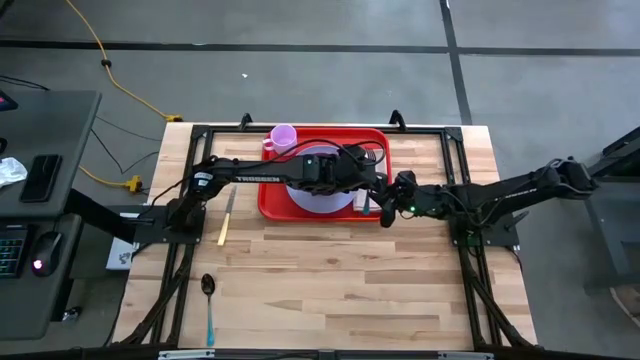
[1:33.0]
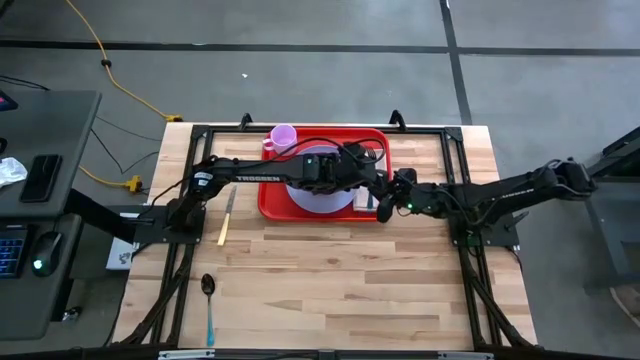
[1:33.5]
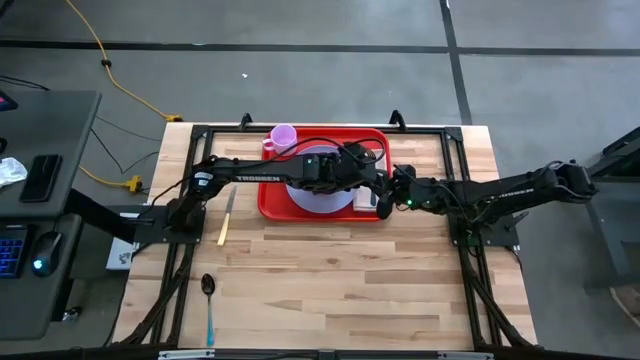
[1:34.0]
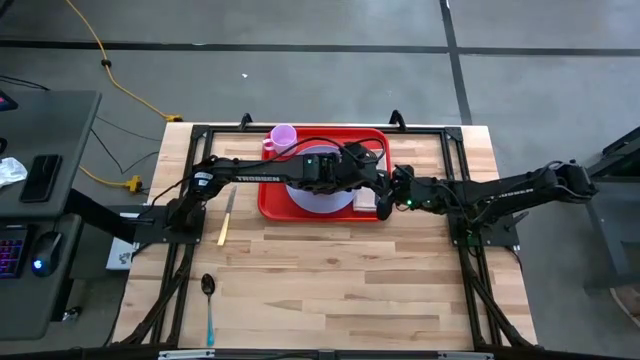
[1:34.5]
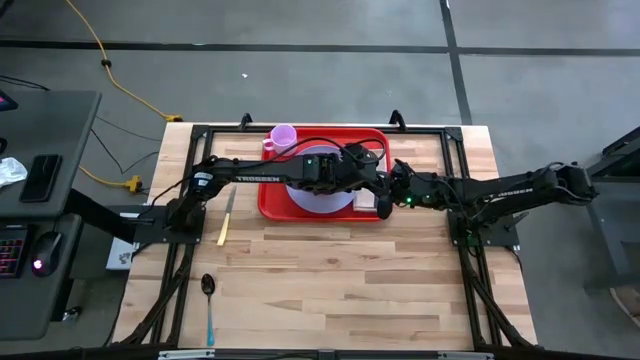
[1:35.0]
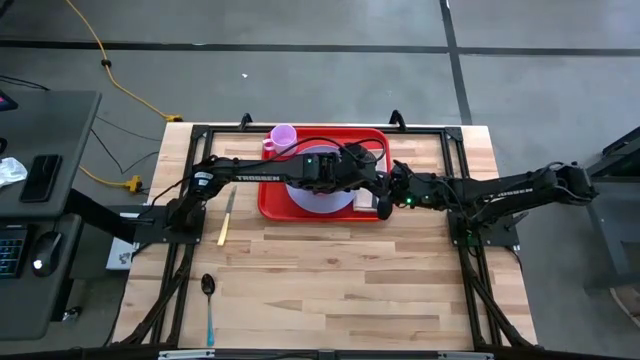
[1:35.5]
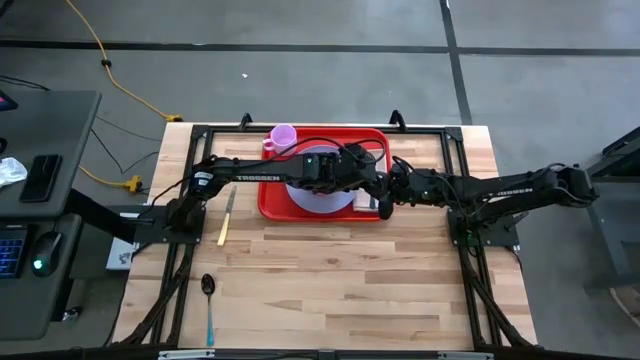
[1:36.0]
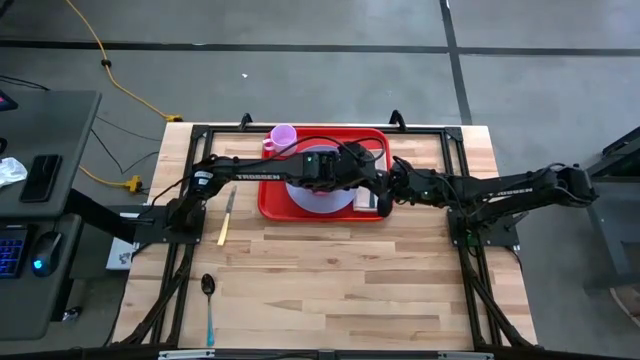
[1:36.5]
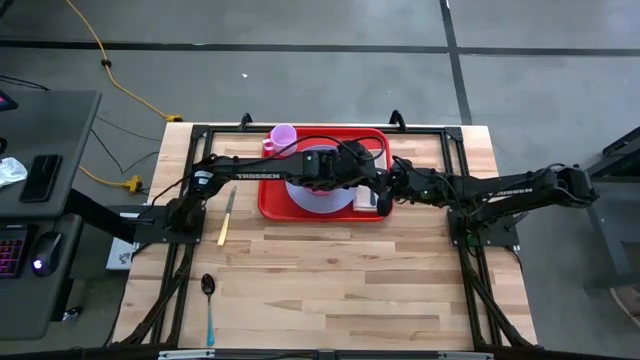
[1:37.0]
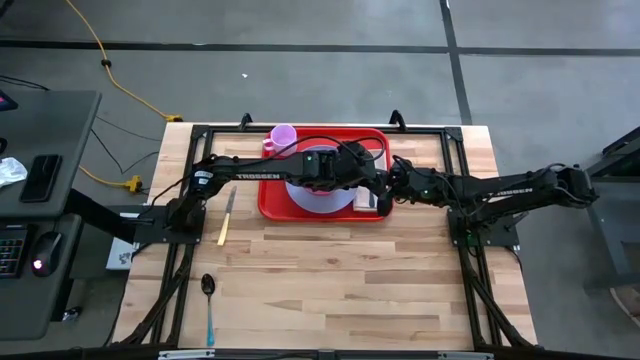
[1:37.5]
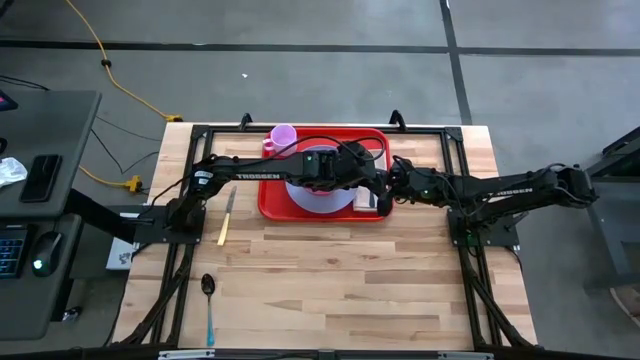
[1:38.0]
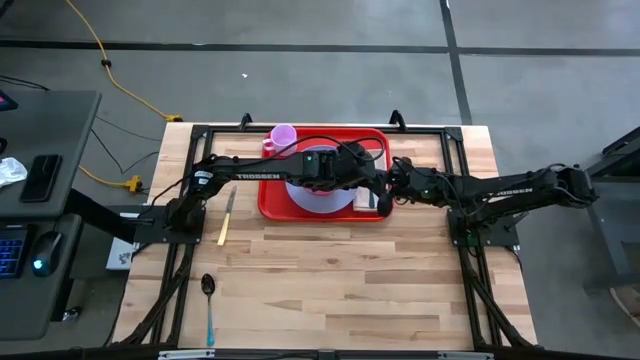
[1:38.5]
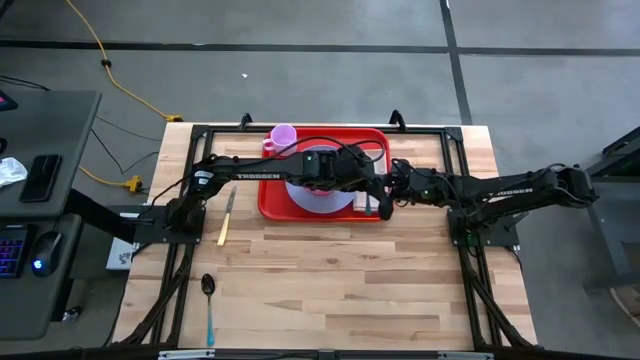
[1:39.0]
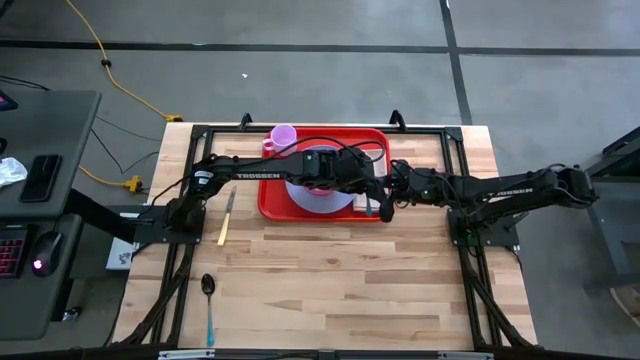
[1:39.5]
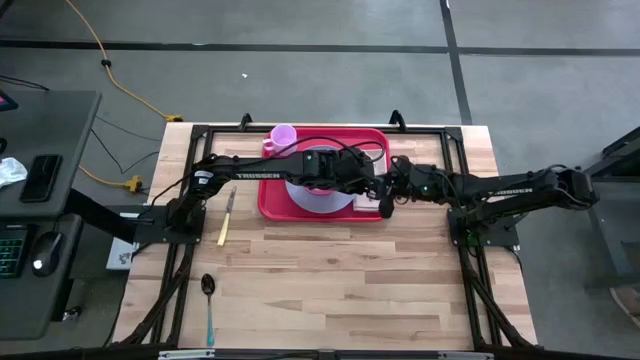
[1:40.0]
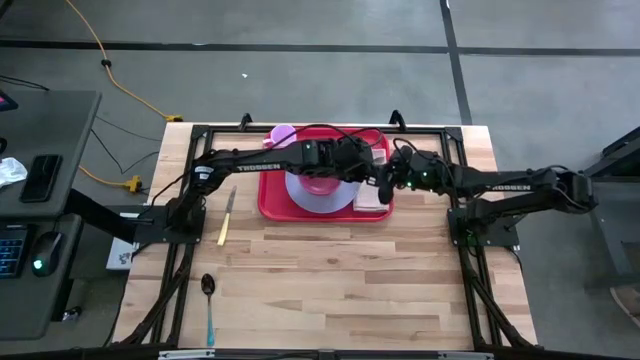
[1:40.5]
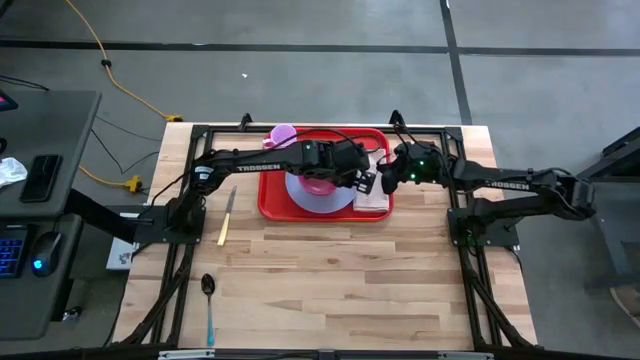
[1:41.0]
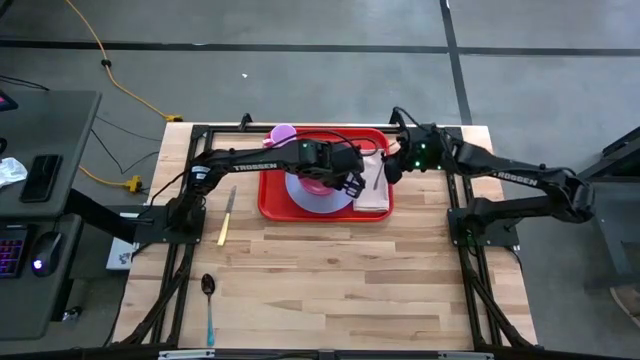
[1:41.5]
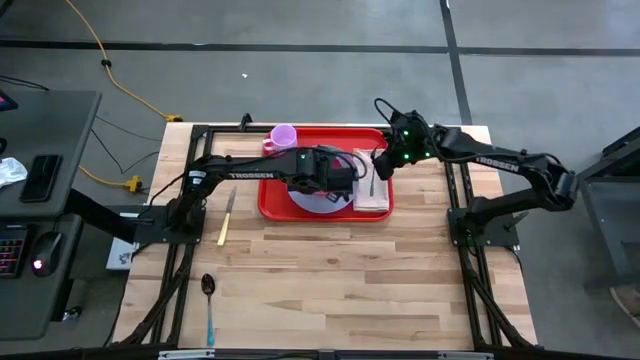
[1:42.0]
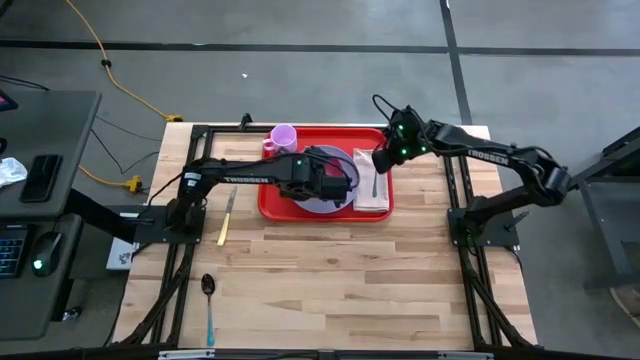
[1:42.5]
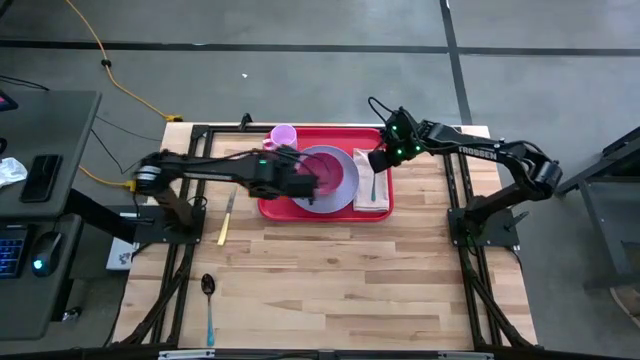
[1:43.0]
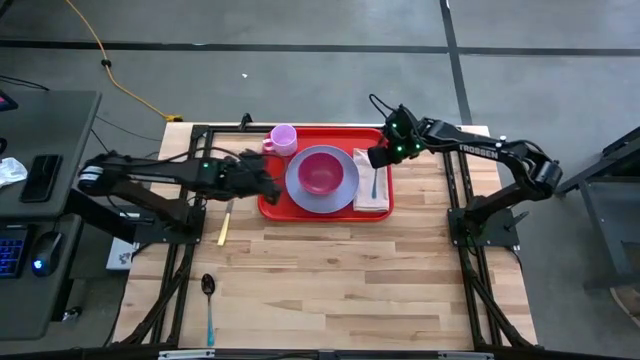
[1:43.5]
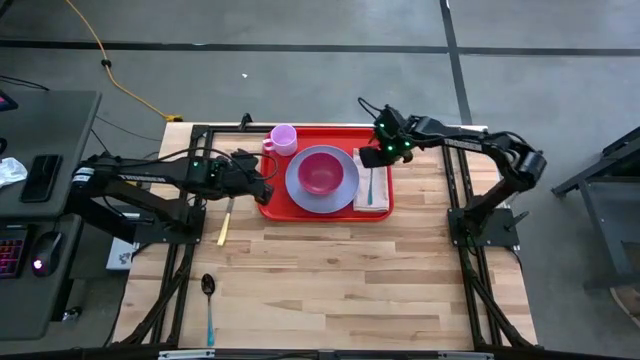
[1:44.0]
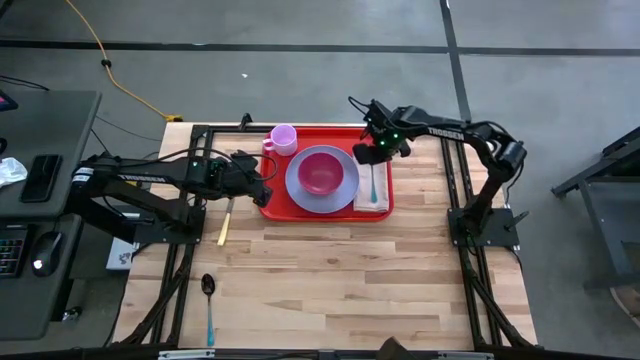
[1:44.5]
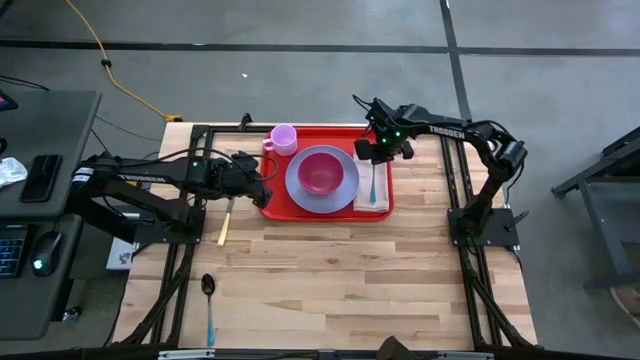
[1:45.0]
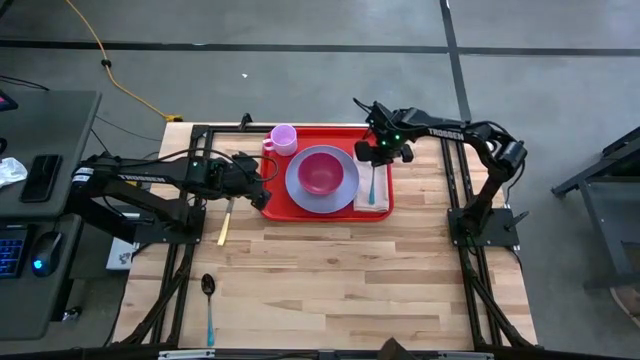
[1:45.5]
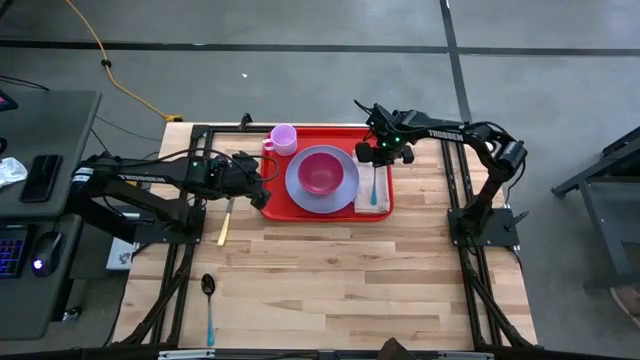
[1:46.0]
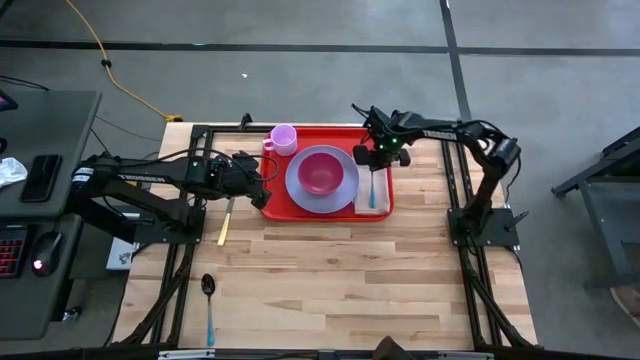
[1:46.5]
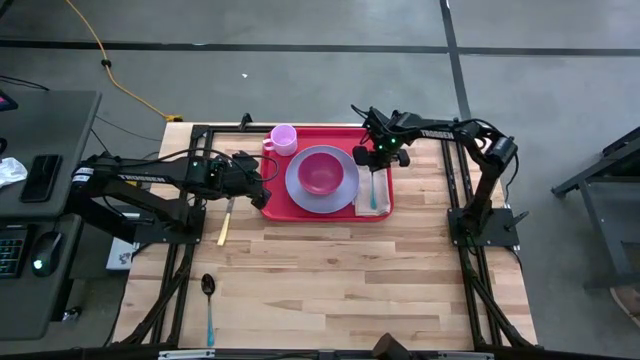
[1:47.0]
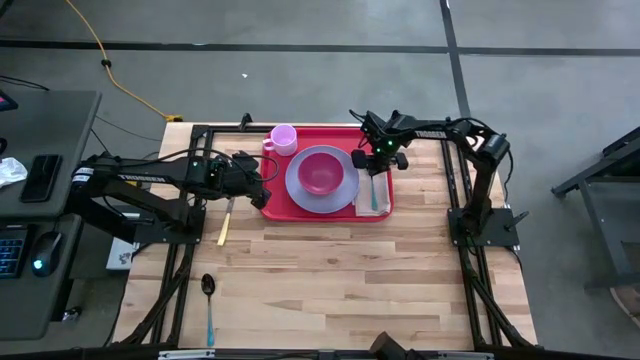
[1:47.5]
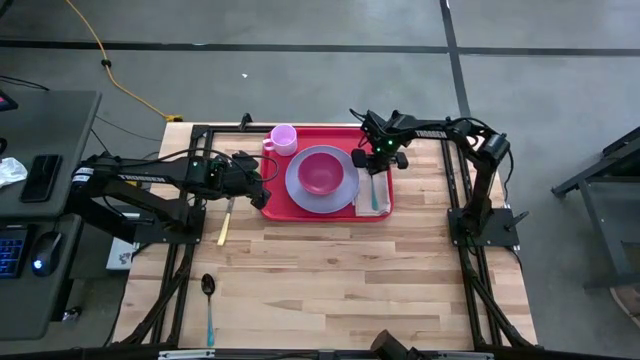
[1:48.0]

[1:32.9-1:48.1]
Task: Set up tray
Put the blue fork on the brown napkin on the orange serving tray

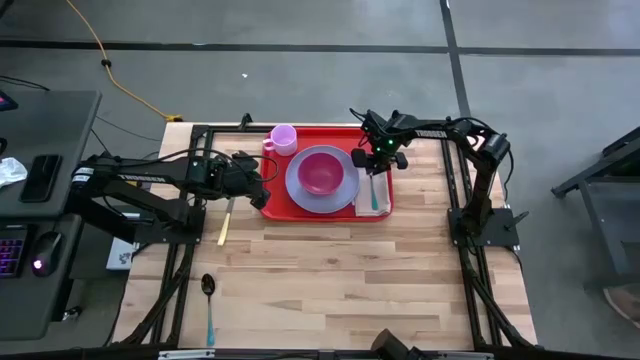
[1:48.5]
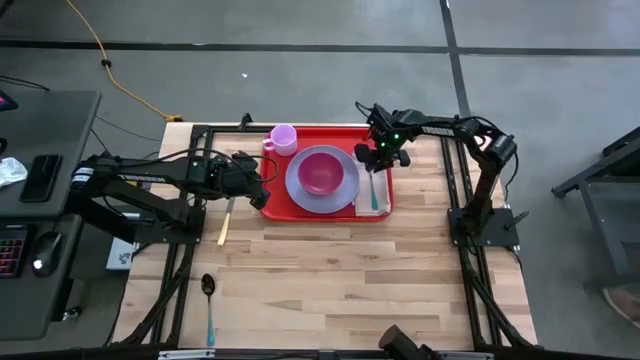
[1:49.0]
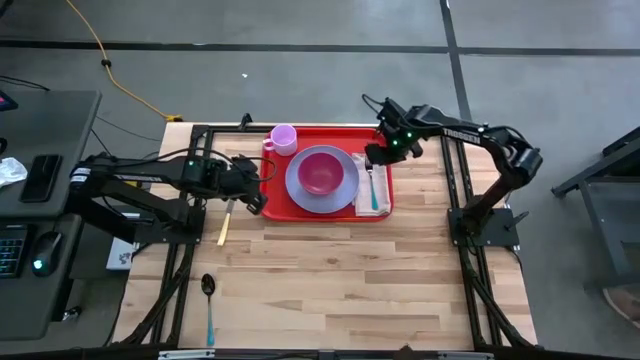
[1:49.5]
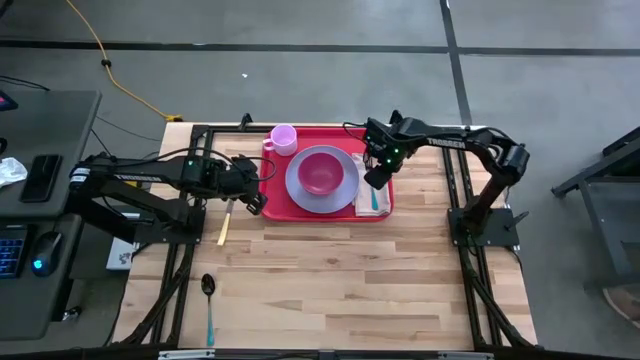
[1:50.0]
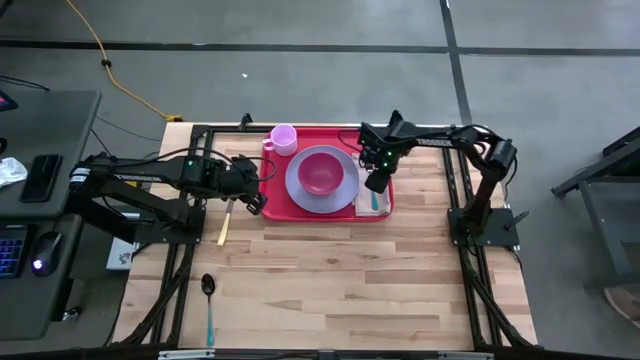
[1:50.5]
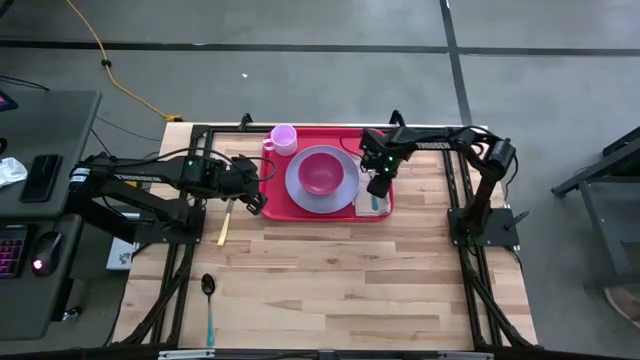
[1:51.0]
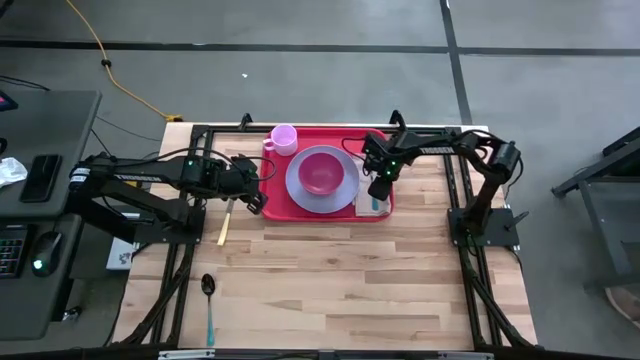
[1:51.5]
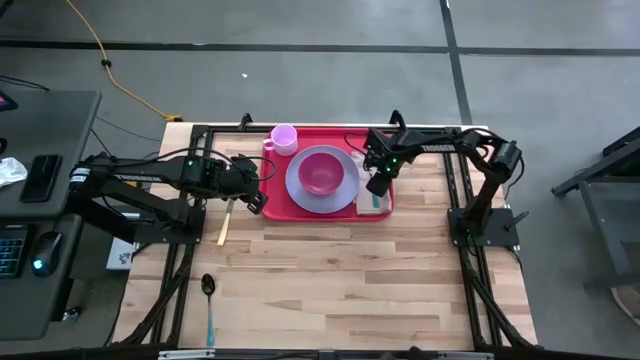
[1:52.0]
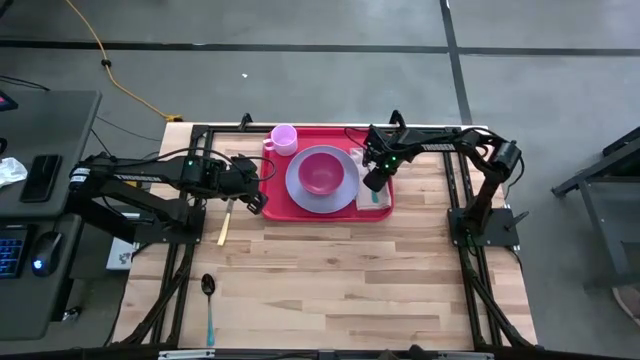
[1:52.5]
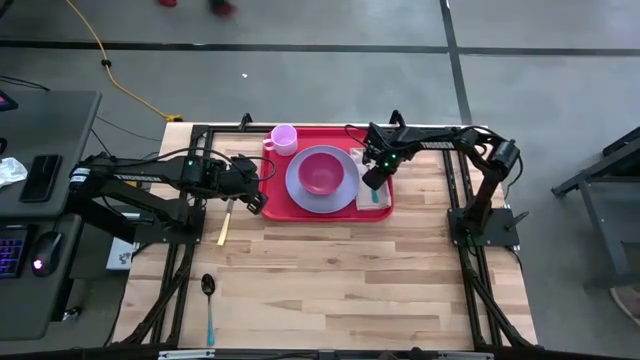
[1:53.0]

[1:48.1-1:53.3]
Adjust the brown napkin on the orange serving tray
